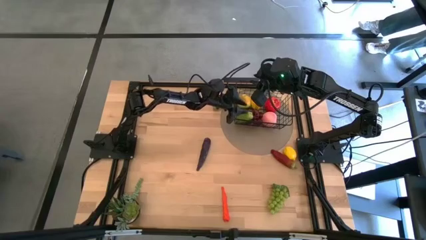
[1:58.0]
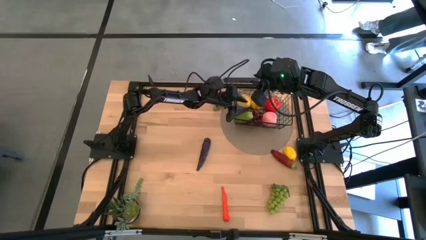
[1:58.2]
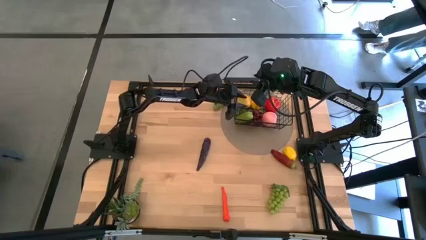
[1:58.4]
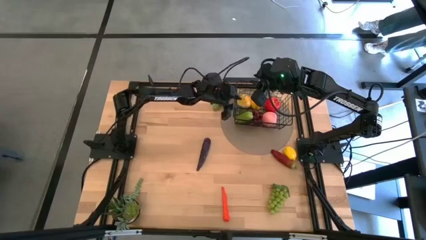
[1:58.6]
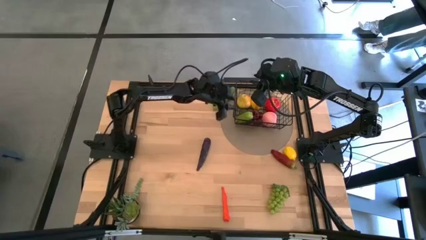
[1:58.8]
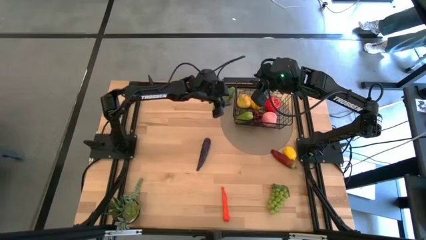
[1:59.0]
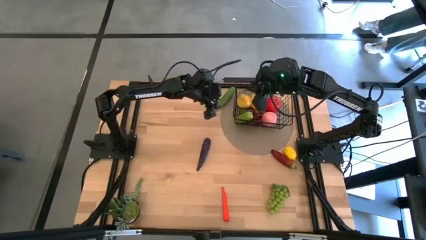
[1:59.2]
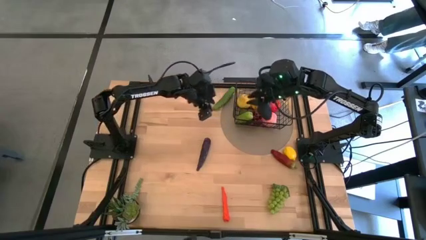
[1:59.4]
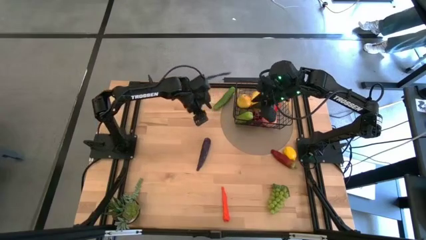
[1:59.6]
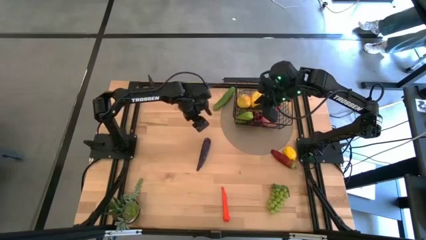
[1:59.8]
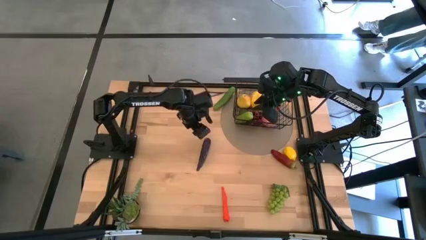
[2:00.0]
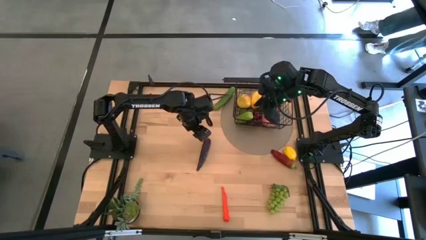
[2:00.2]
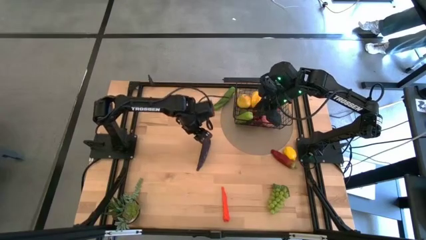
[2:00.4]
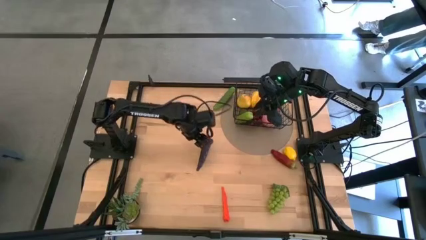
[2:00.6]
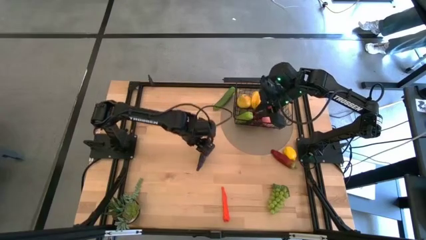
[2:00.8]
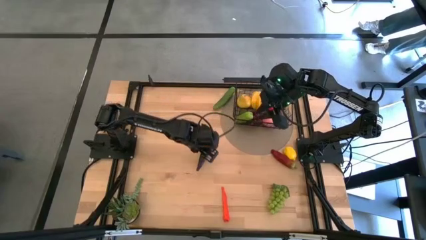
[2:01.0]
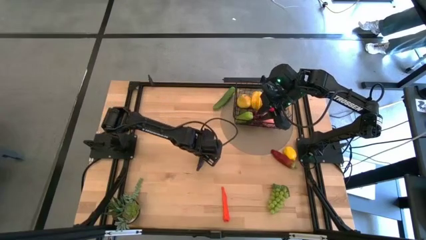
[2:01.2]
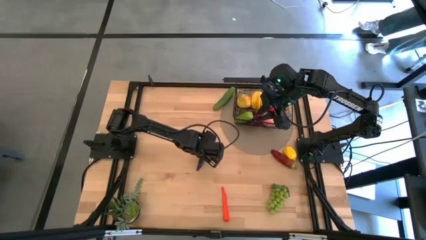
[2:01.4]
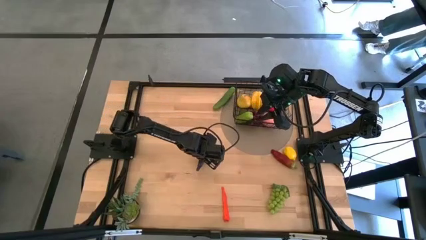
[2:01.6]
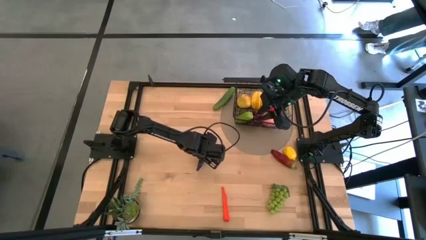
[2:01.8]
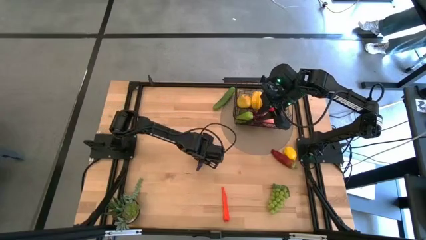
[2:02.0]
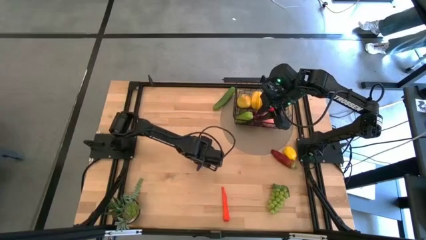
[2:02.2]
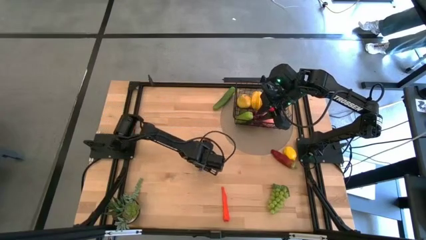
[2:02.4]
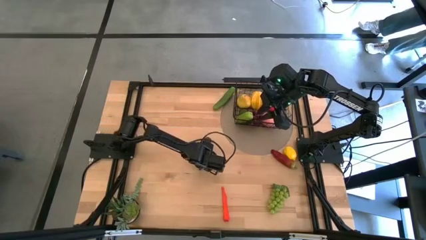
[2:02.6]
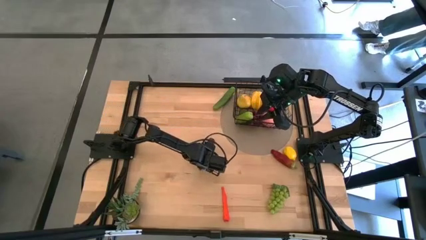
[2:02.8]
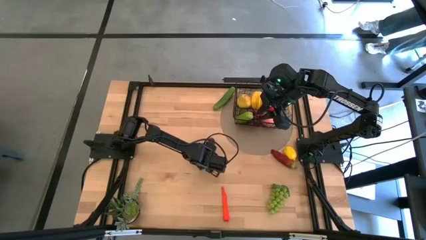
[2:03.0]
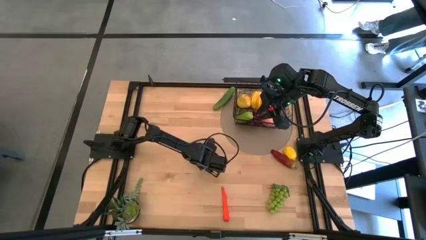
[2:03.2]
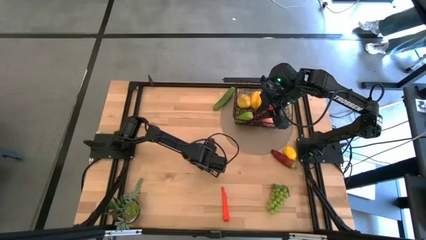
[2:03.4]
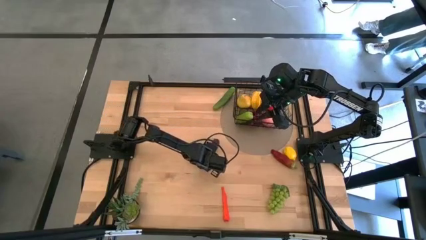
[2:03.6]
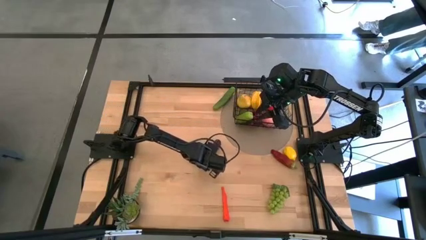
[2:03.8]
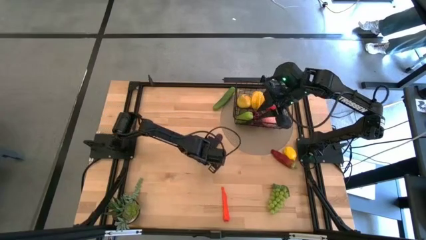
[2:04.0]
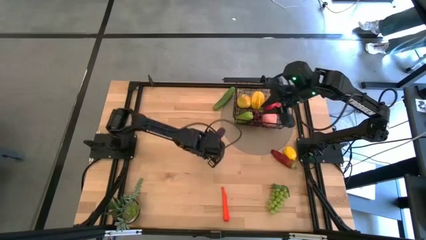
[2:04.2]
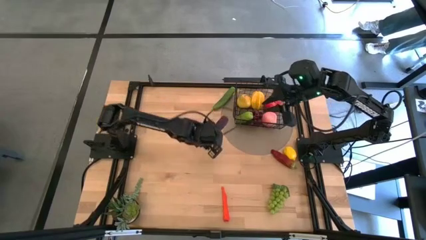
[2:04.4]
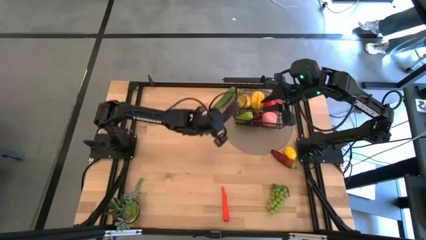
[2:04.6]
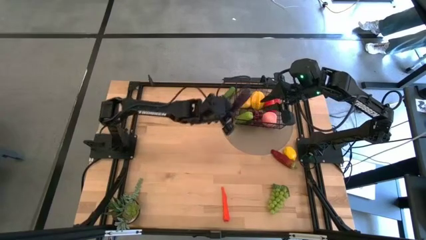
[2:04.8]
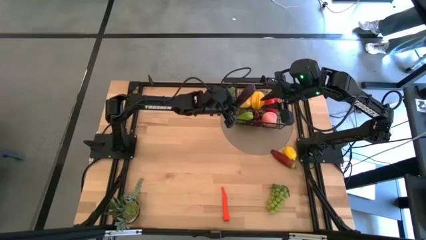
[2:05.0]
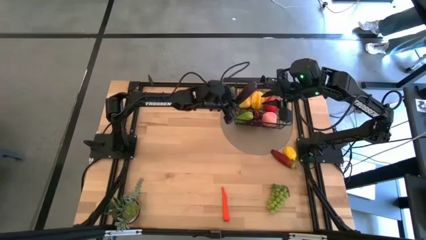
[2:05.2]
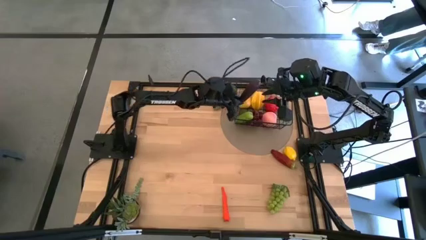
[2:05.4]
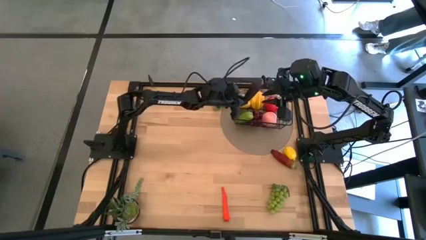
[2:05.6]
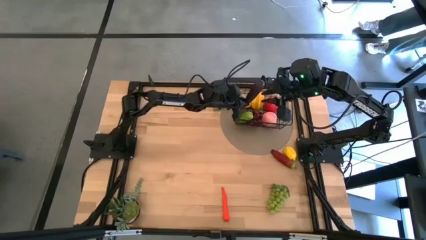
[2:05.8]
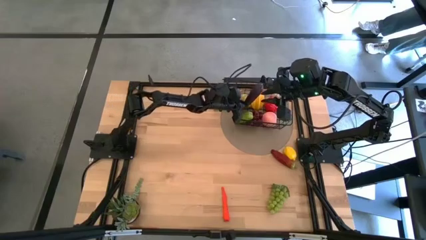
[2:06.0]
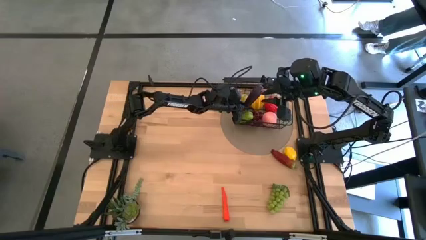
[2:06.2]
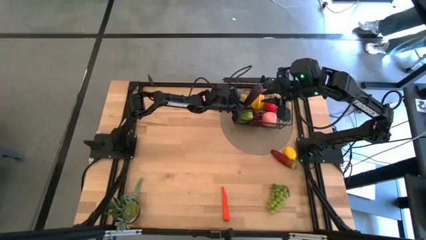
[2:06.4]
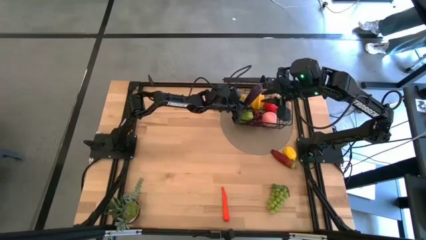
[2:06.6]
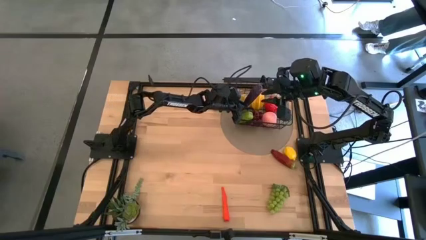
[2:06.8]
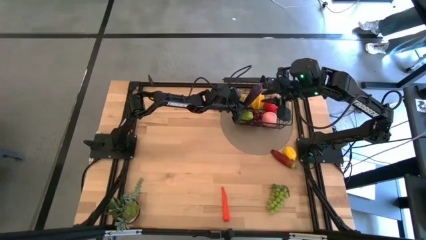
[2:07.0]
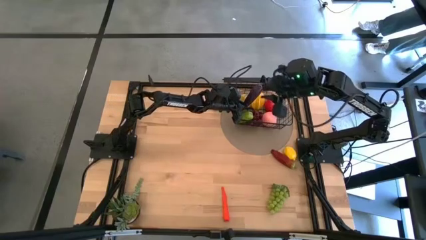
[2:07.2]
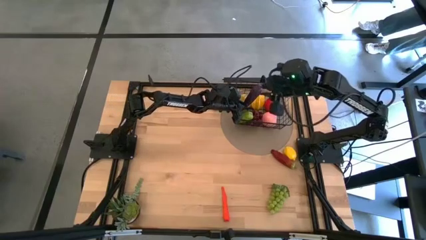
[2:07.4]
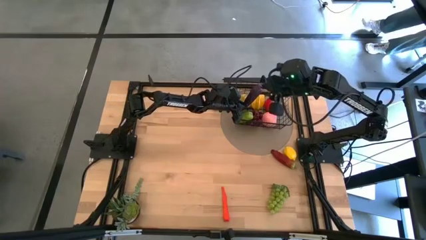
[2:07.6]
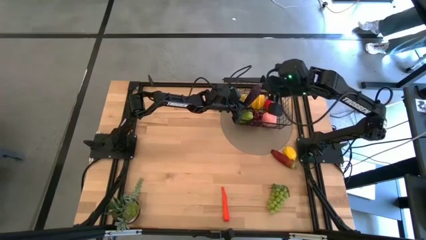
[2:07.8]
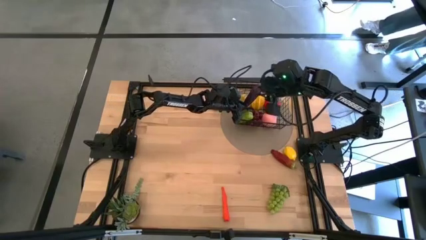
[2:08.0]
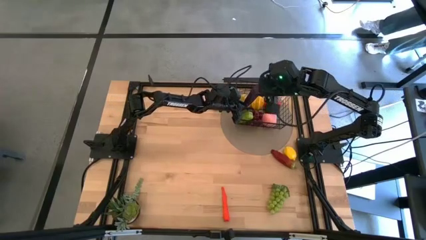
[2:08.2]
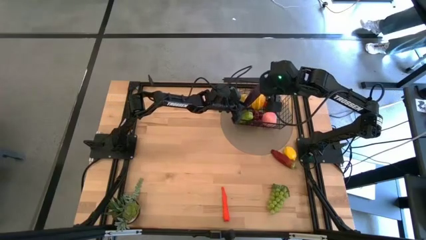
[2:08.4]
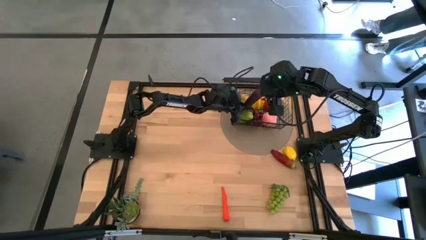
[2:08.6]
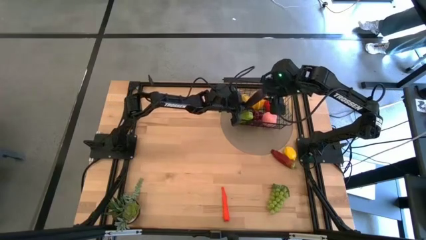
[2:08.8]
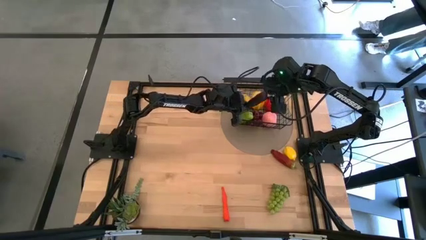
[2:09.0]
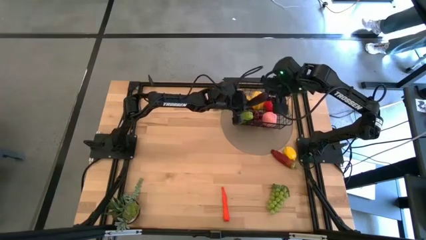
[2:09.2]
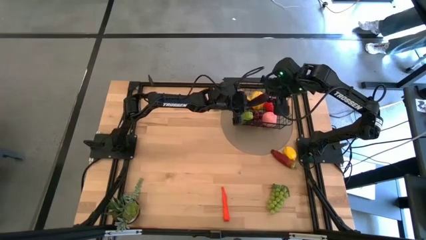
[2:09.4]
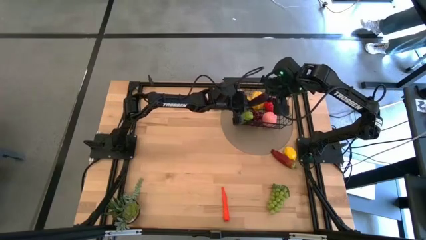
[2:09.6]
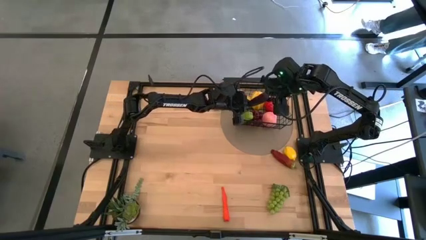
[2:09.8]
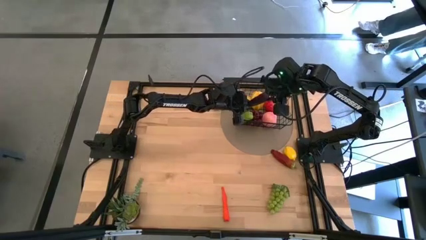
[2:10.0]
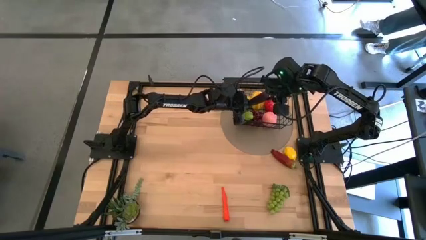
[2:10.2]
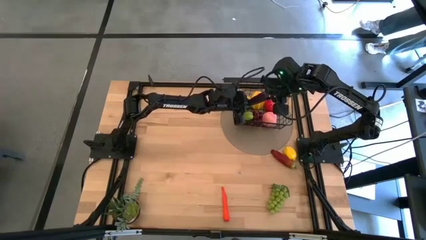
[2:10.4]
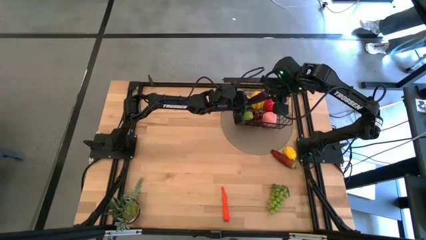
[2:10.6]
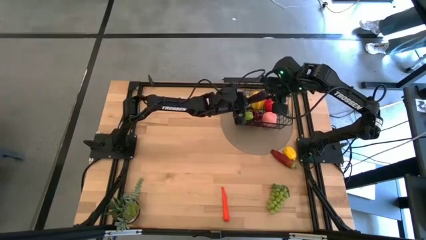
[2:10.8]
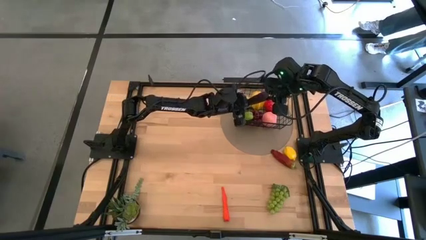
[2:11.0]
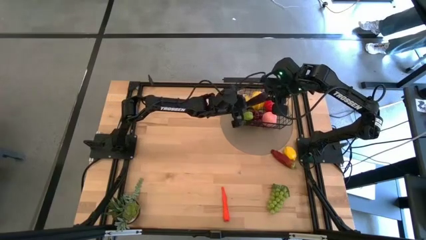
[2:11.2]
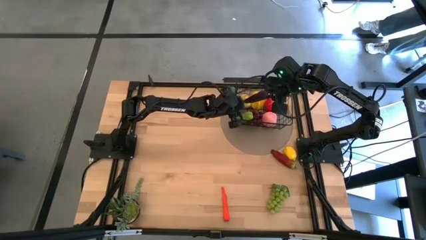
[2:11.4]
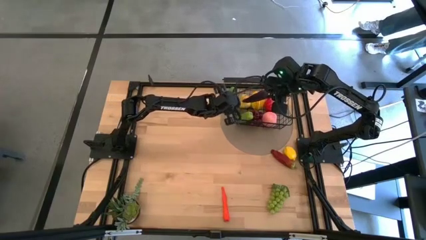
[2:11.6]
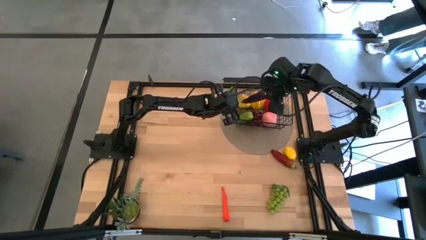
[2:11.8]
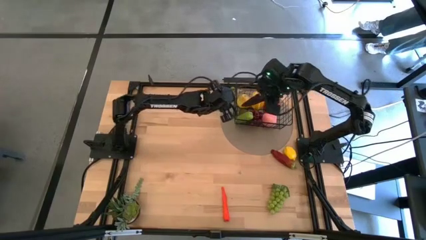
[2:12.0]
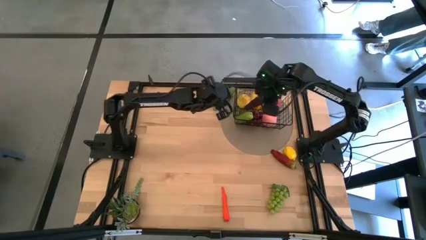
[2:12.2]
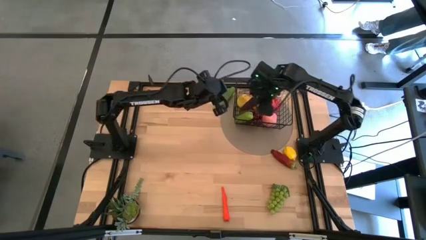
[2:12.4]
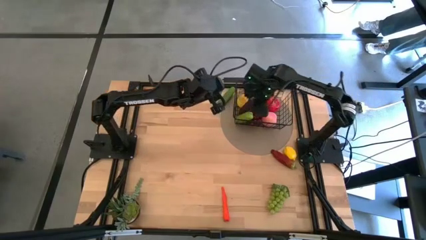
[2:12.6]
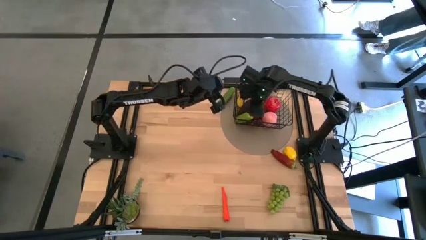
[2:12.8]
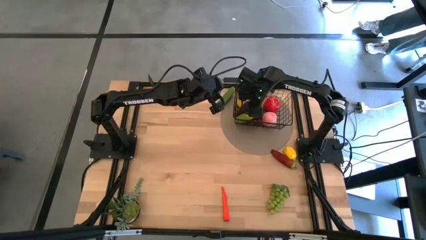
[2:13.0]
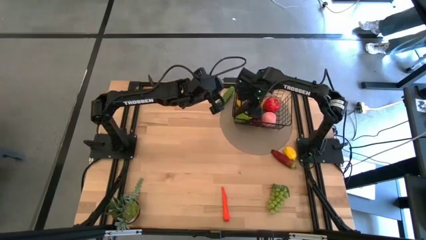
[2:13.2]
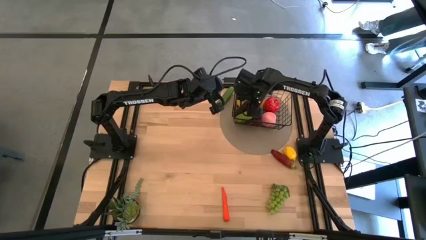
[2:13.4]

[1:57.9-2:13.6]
Task: Build produce basket
Put the violet eggplant into the black wire basket

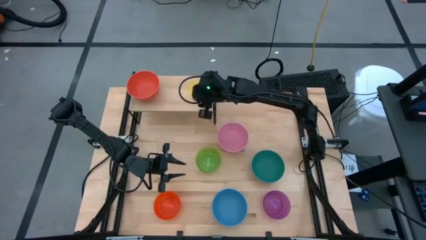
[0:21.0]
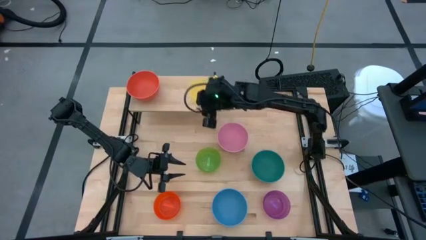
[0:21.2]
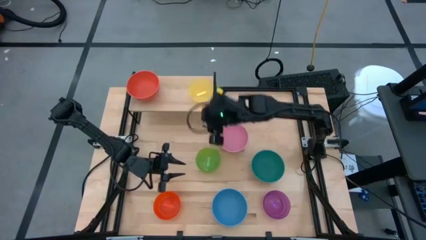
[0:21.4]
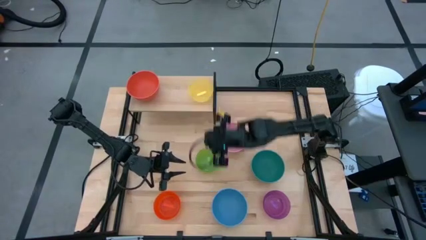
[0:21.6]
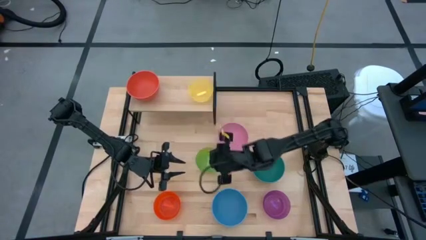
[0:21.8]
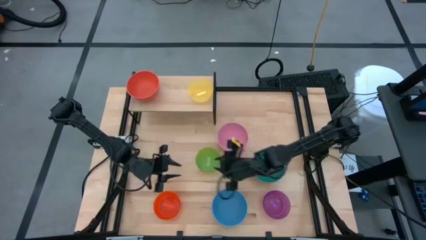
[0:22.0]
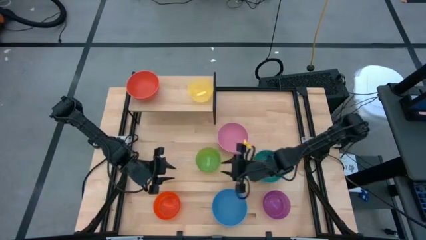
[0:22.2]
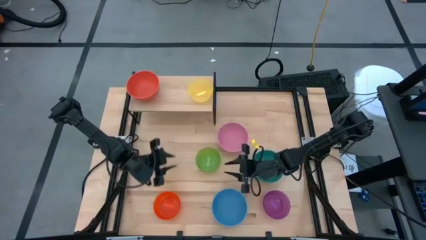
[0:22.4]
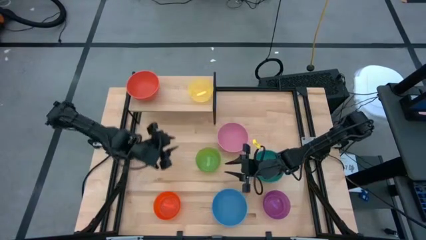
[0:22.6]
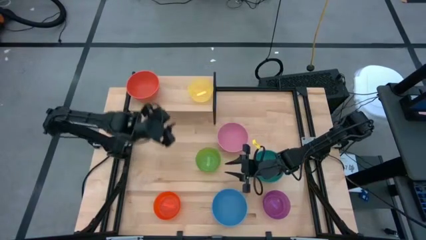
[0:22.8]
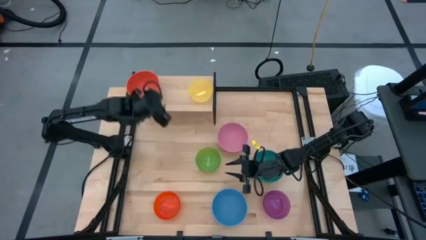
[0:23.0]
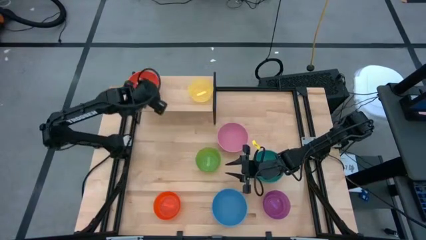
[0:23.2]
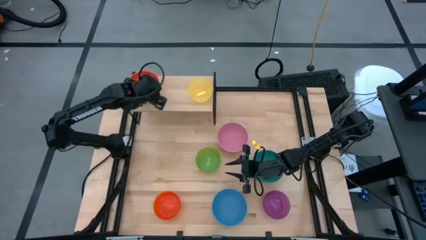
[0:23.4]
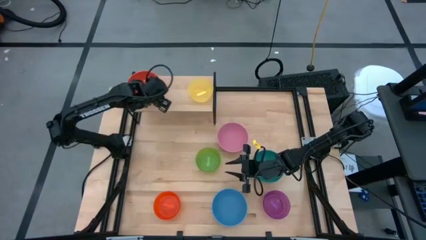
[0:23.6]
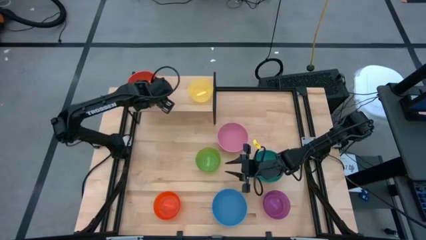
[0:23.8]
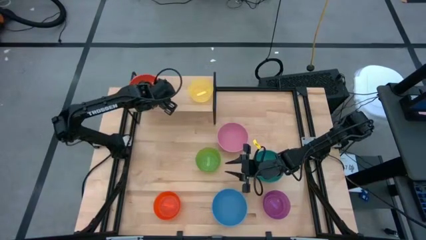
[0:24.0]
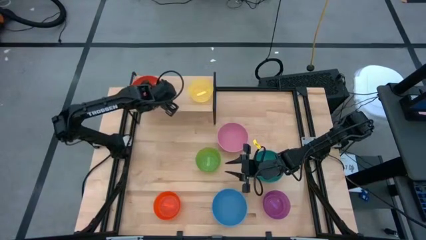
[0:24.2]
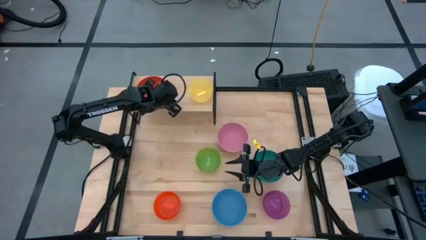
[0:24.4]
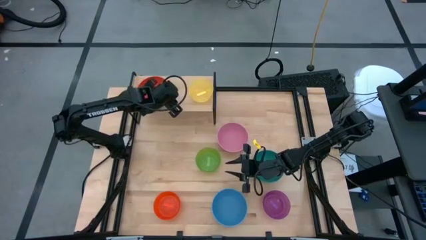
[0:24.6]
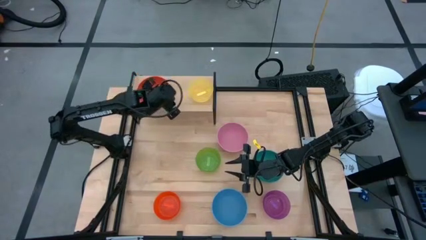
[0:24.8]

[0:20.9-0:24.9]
Task: Place and stack bowls onto a shelf
Adjust the orange bowl on the shelf
